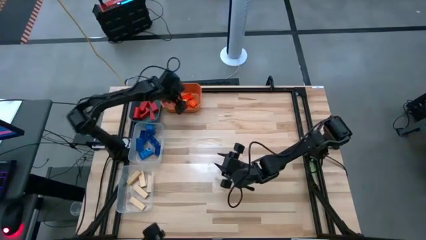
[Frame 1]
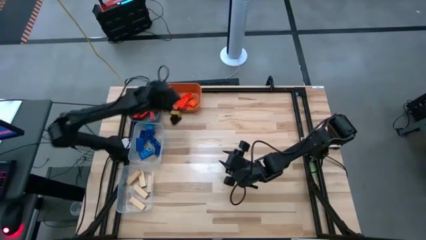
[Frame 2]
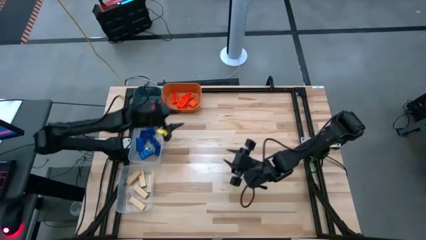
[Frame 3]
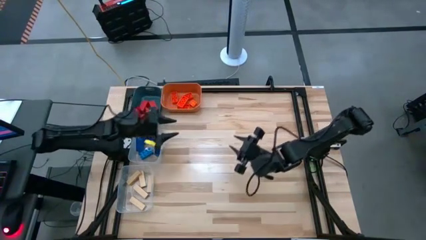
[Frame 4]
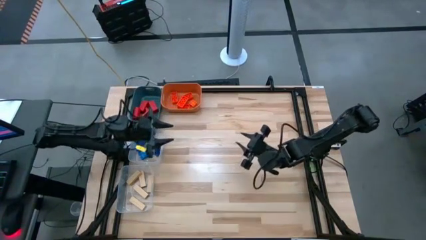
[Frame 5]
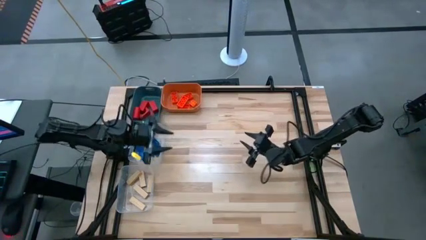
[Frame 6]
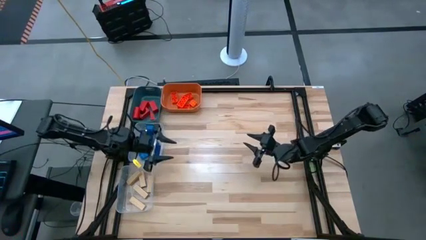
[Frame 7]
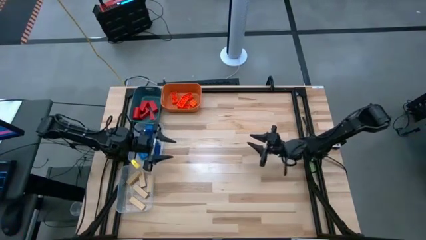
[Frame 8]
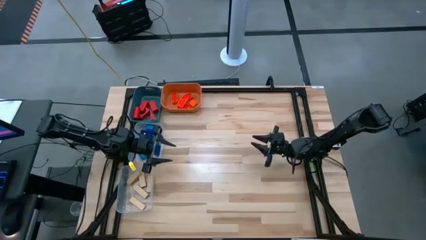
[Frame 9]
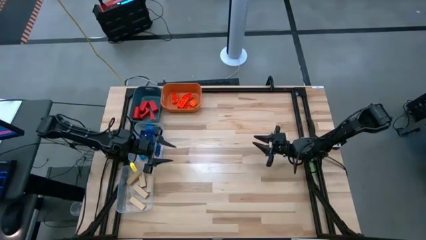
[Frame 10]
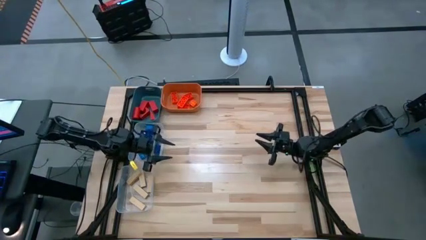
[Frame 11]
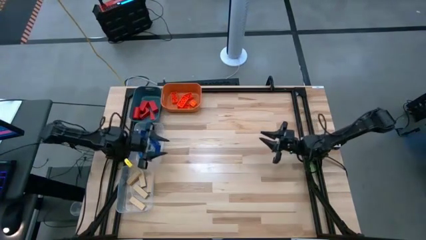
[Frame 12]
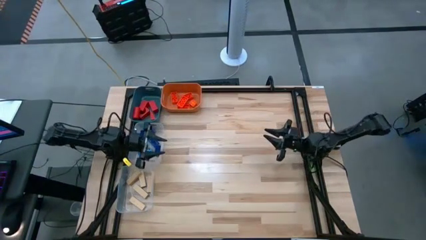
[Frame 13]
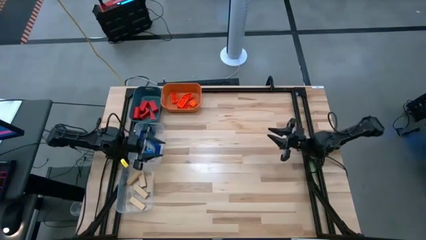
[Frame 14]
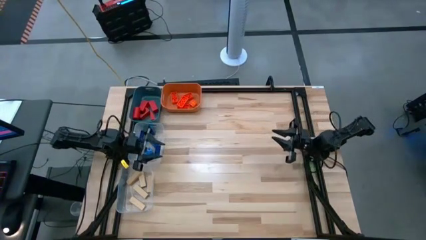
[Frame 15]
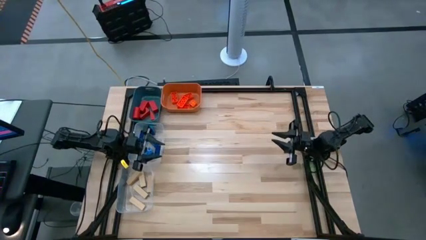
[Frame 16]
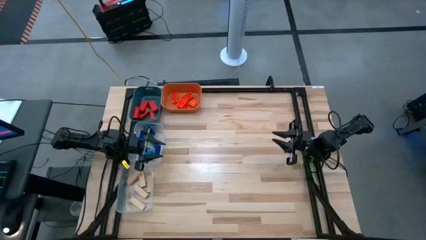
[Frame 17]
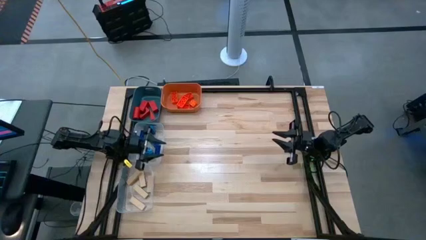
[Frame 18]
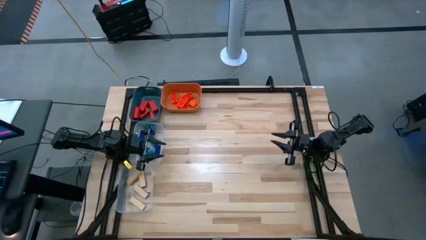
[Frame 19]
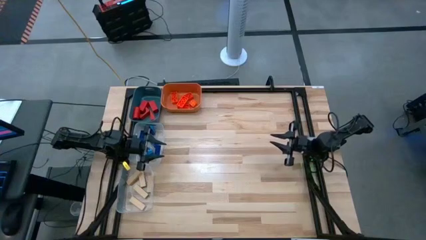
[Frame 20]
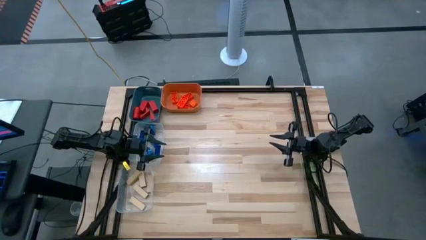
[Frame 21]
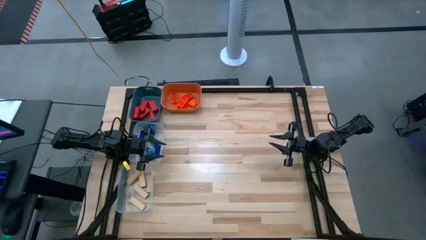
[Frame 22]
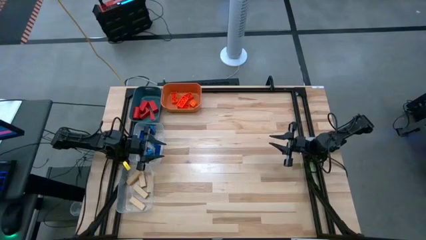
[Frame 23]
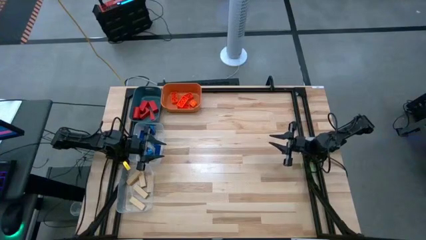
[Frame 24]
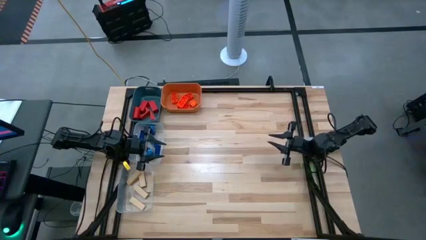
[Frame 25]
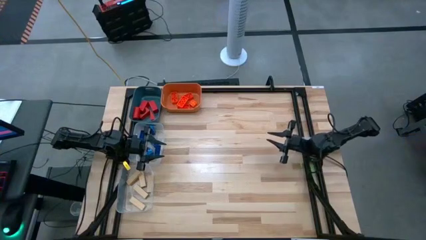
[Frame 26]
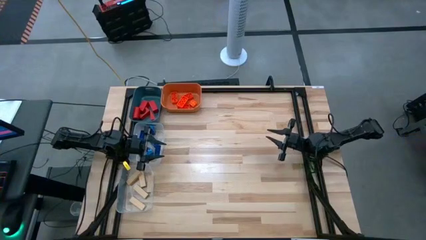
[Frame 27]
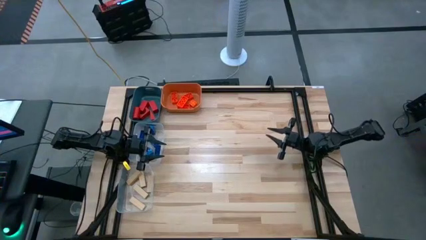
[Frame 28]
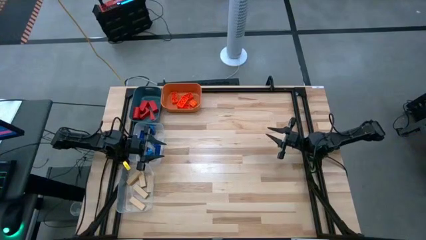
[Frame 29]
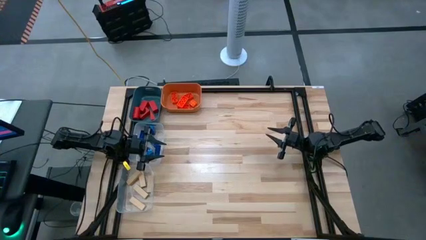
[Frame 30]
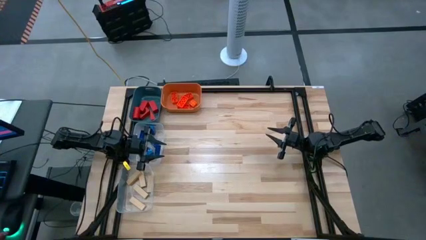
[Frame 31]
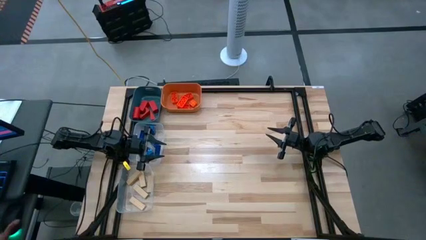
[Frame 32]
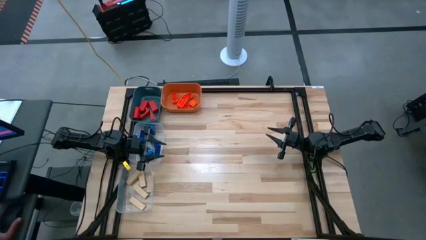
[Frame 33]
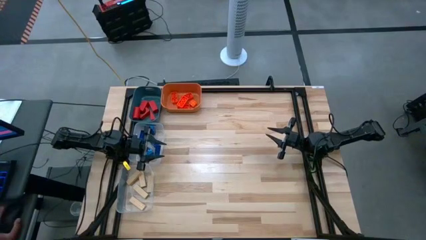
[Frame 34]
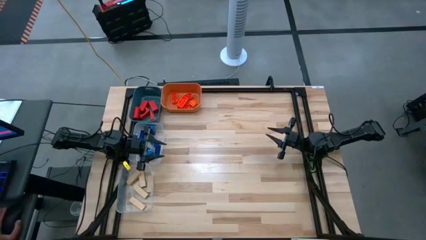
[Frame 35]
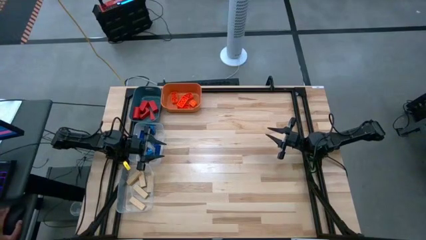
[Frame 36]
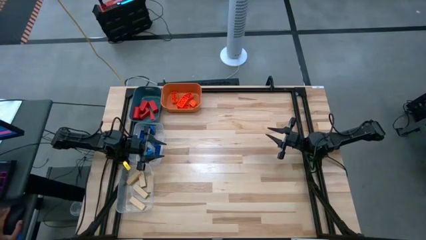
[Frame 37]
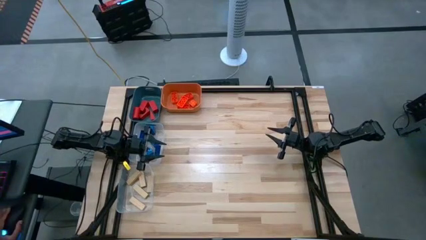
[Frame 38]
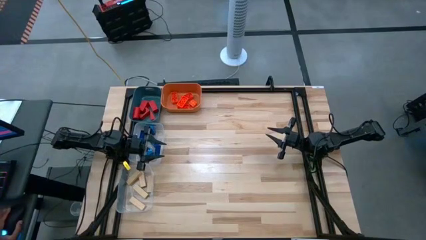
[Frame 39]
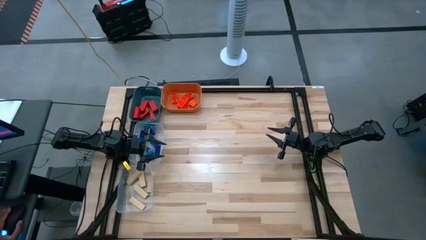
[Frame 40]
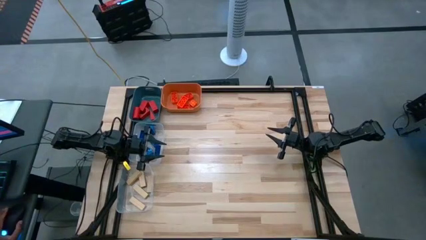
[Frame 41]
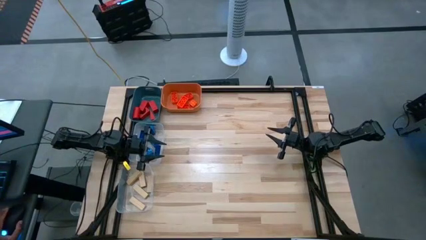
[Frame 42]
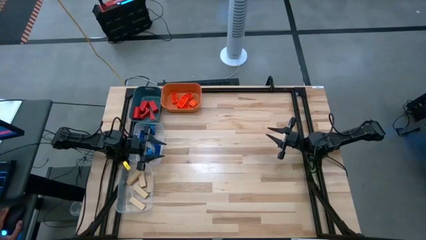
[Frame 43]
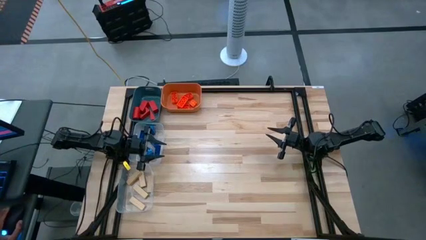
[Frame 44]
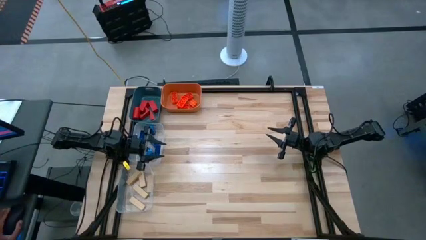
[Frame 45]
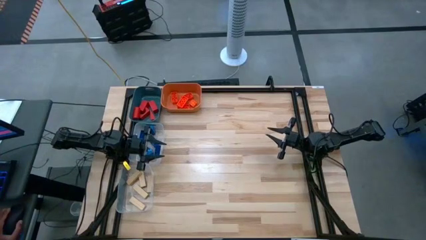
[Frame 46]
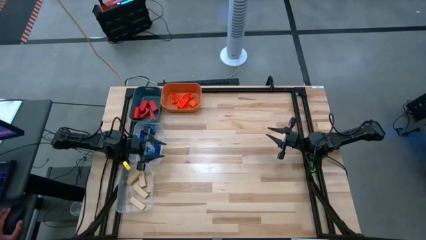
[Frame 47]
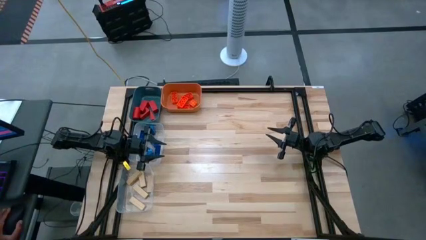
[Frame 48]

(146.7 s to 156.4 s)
Task: Sort blocks
Return to Home Position

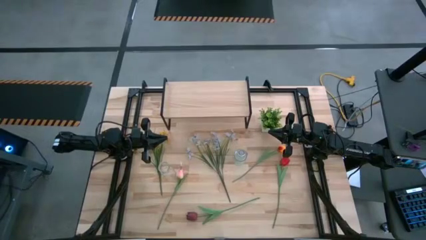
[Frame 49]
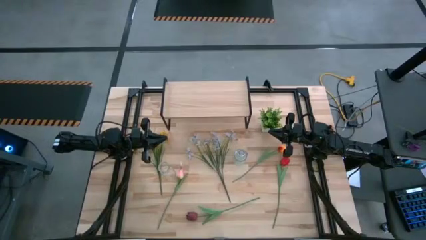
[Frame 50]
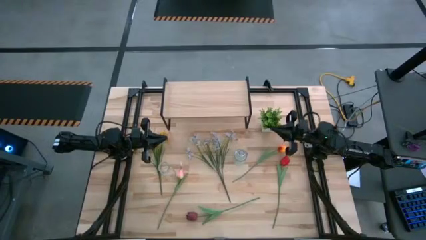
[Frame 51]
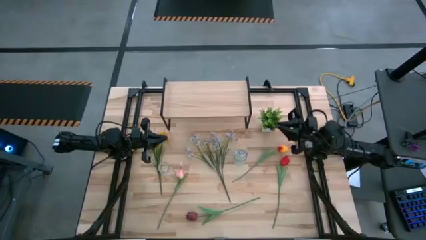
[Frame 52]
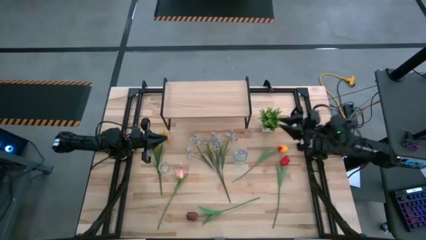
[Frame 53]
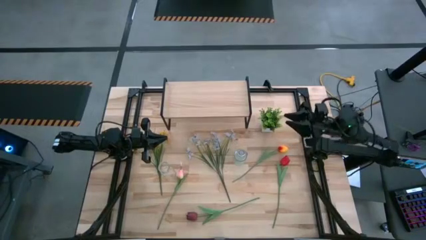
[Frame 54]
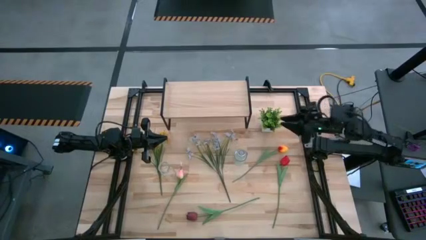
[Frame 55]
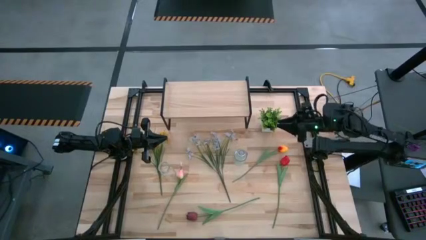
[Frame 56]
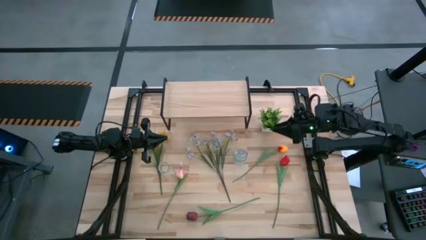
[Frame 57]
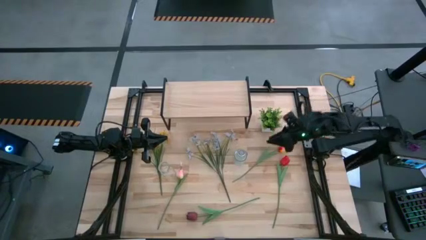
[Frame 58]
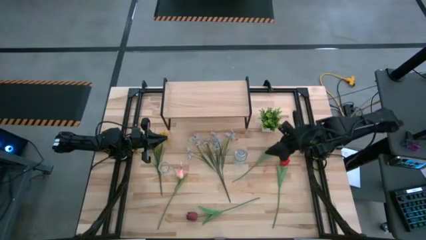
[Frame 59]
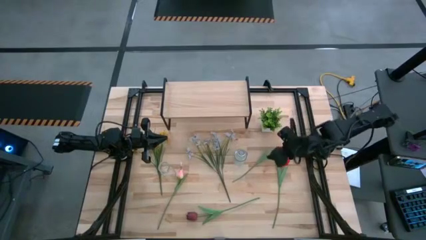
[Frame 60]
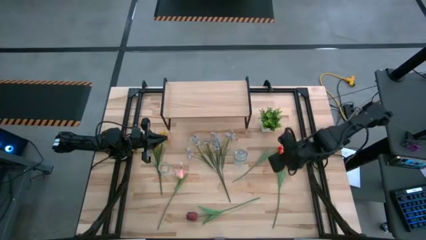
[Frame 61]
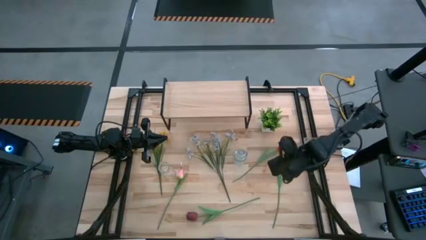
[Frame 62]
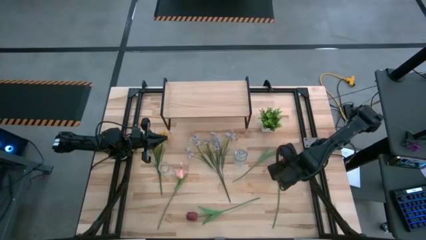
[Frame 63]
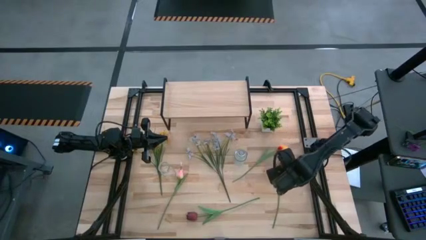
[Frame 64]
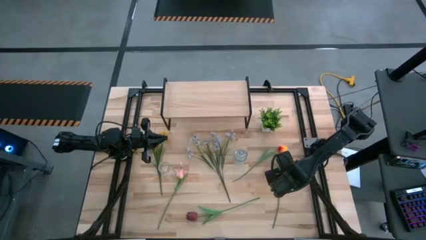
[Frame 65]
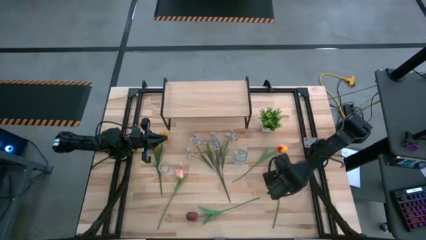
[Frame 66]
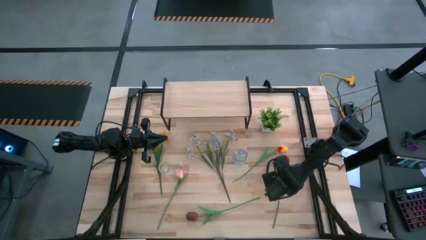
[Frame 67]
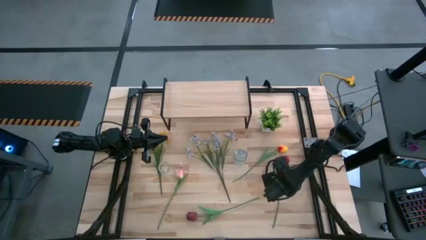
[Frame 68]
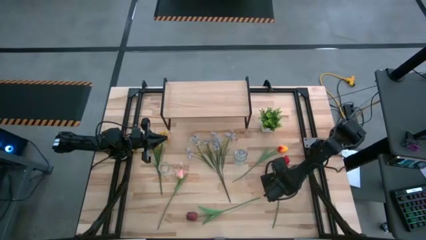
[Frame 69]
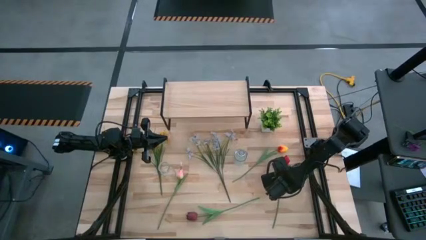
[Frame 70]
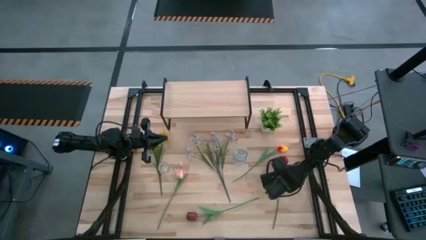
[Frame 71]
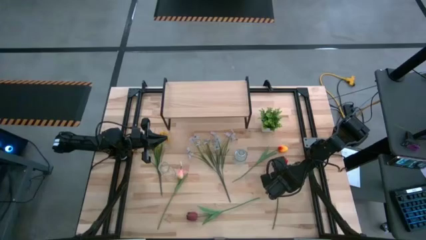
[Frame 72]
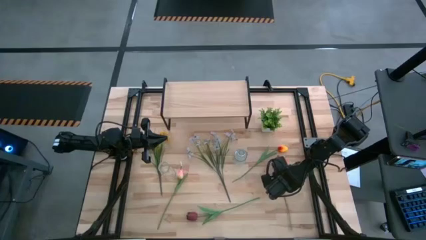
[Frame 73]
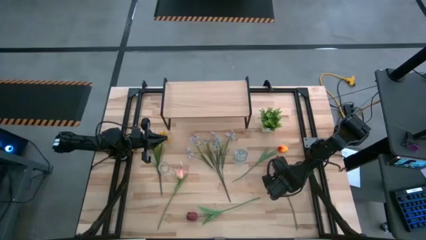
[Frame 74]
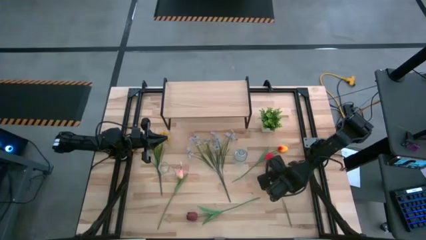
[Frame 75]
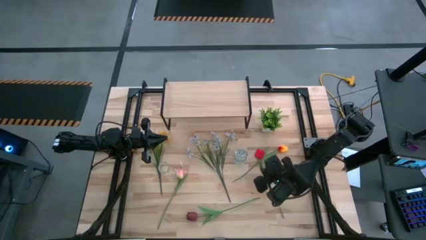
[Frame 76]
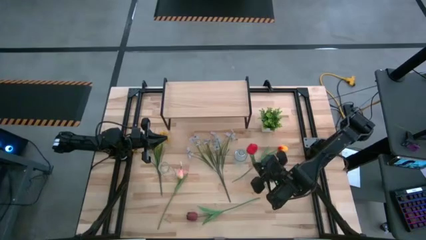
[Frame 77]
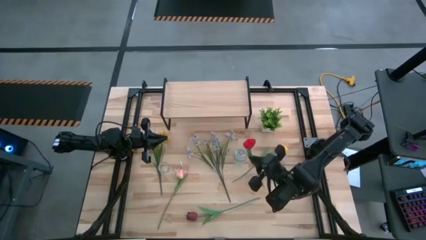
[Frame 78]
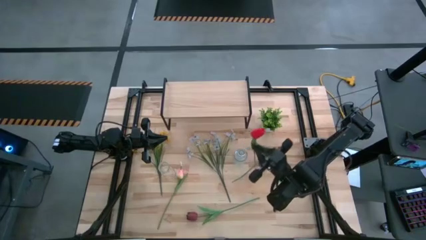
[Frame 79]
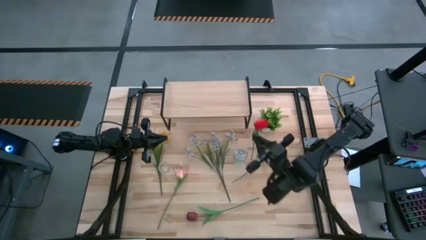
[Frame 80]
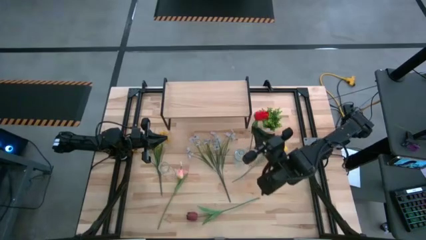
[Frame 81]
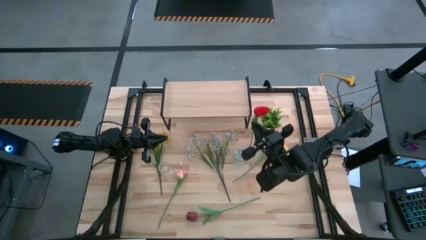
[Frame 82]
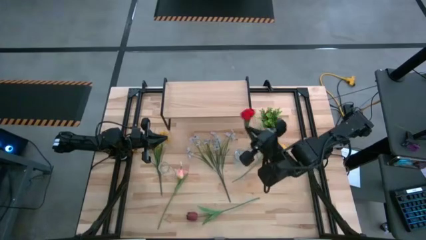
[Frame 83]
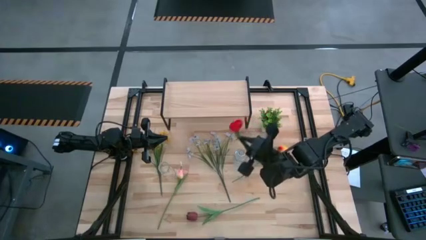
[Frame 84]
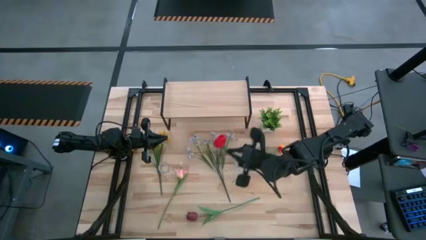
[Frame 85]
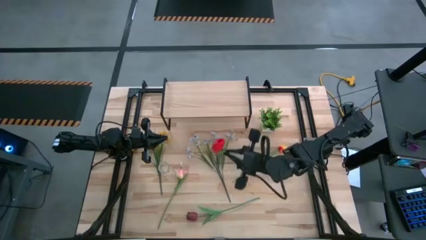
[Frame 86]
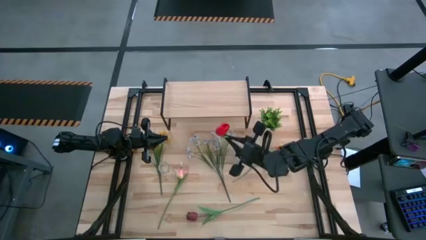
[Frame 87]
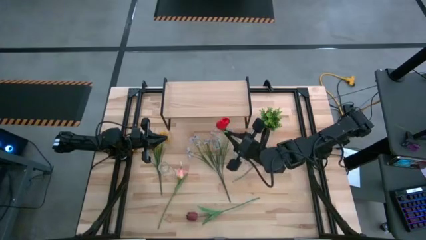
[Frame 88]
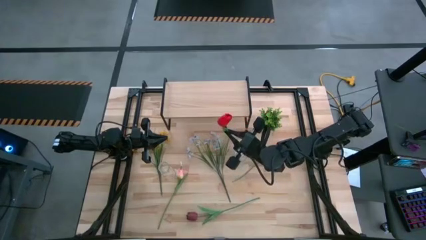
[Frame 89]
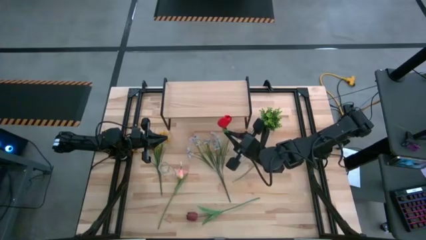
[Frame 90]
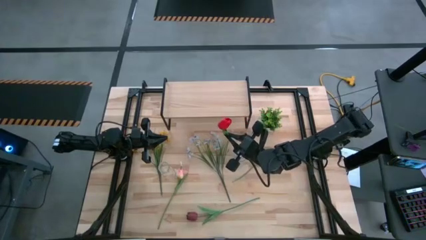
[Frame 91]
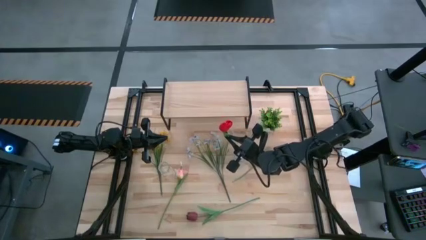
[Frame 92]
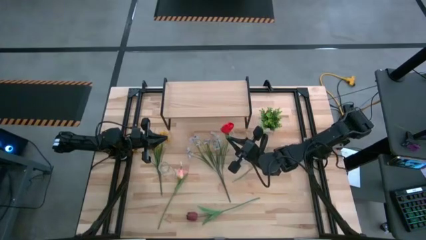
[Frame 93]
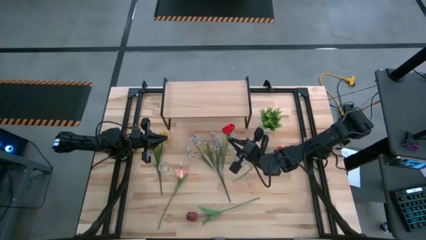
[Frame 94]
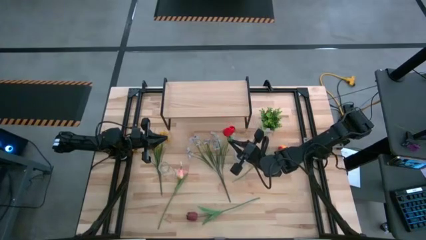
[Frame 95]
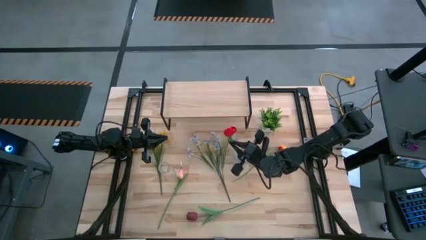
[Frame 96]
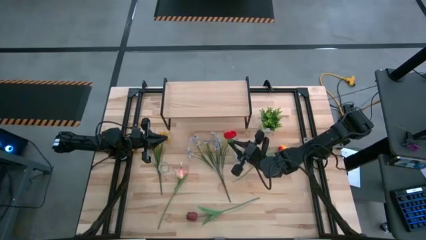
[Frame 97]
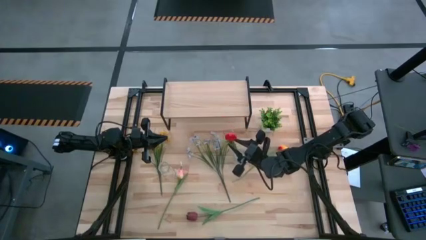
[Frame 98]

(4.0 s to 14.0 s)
Task: Pick and place flowers into a vace then onto a shelf
Put the red tulip into the top transparent vase
